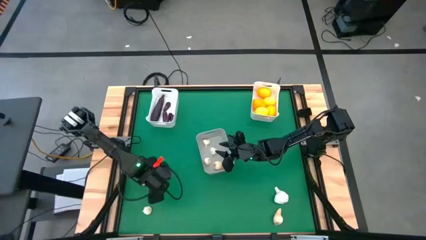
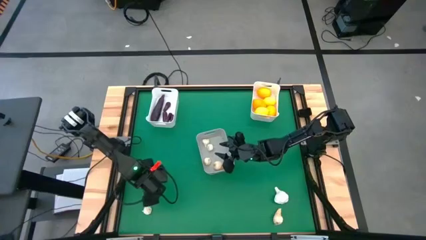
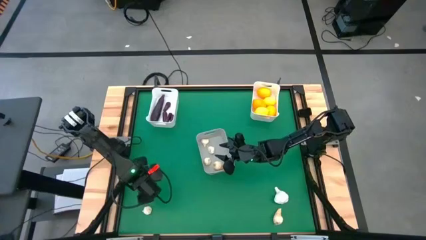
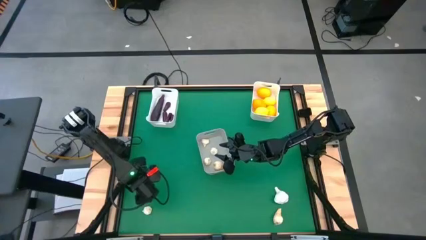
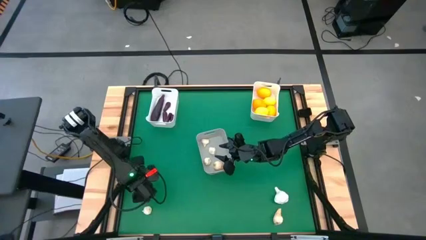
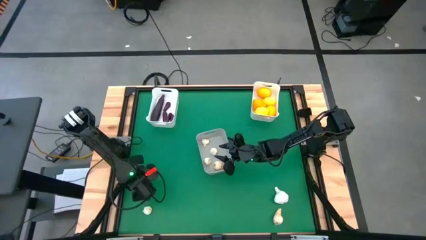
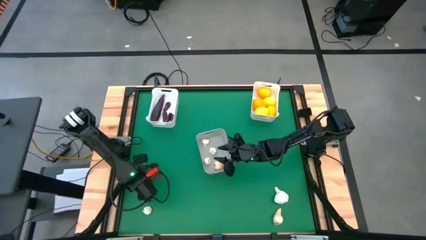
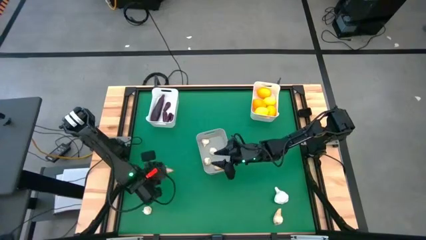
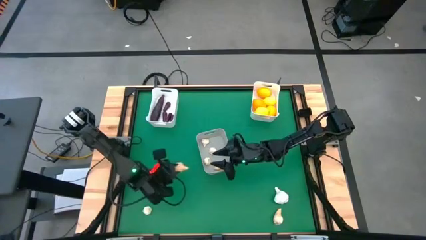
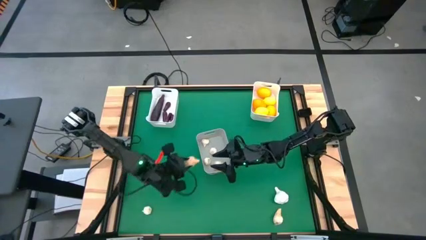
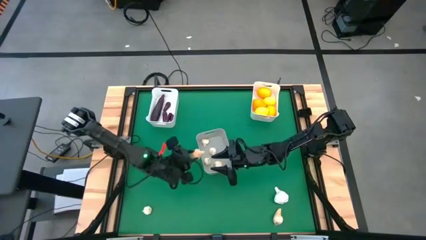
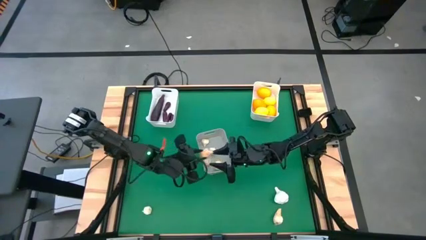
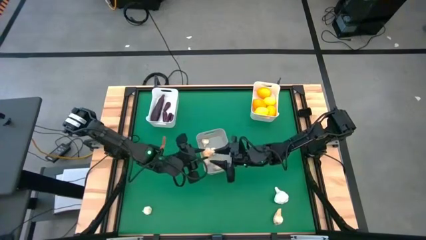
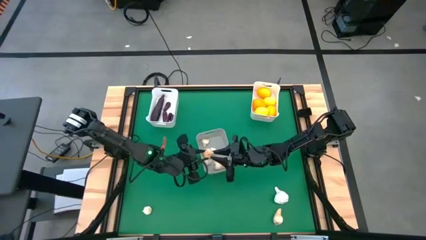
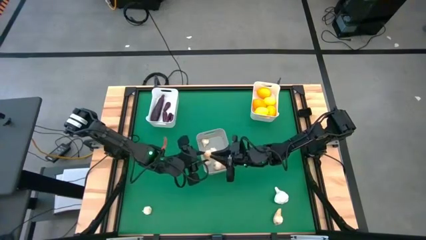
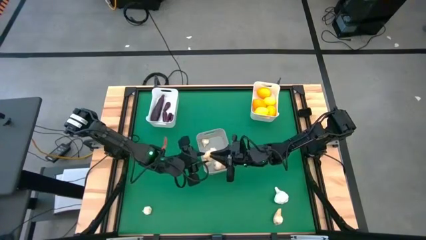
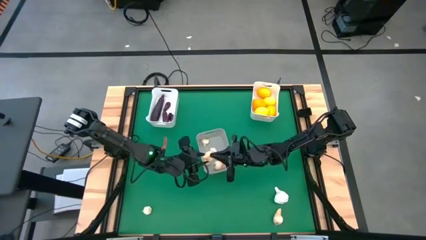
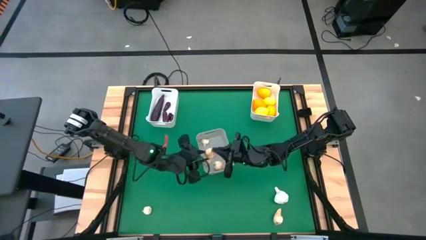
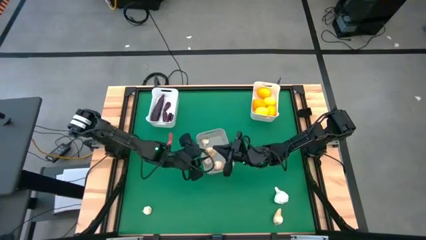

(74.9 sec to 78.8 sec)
Task: Sort produce into baskets
Put the garlic into the gray bin

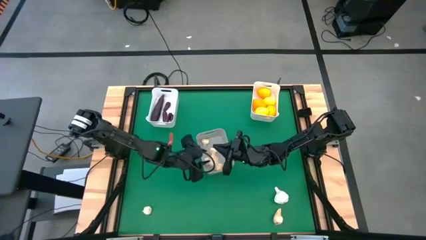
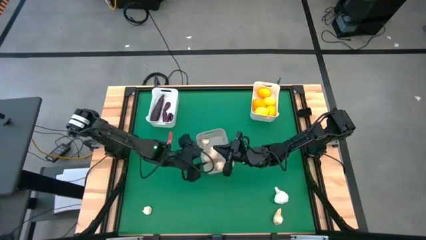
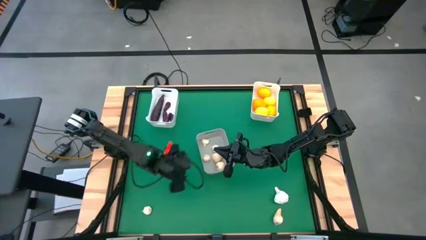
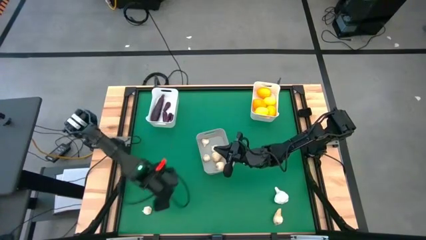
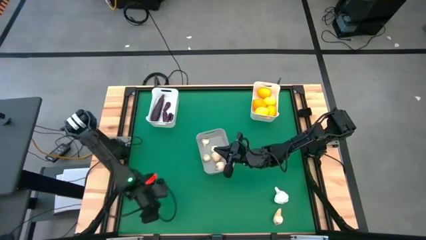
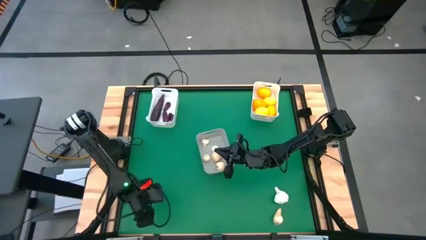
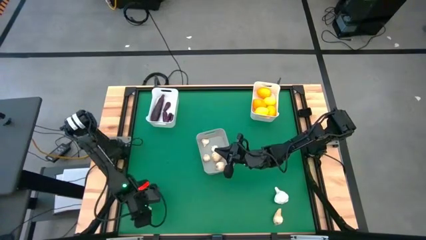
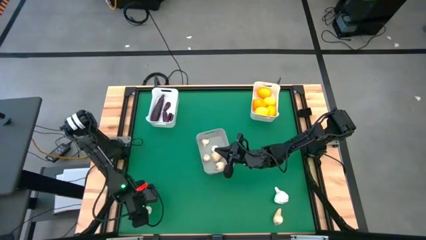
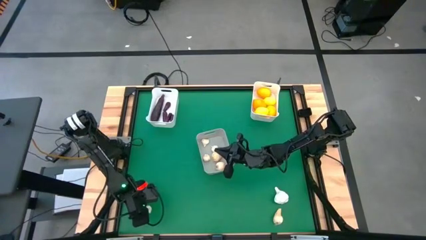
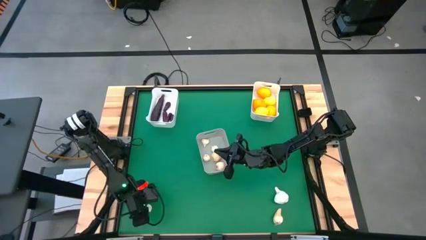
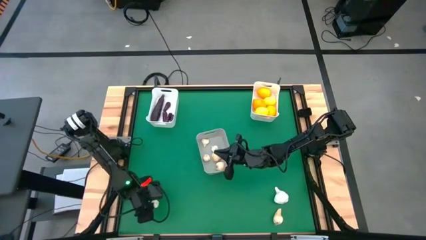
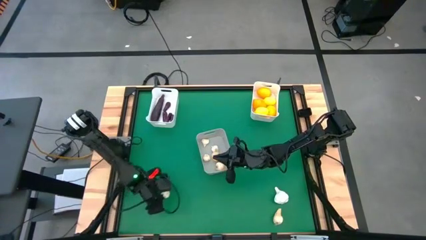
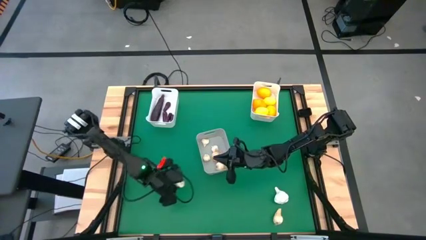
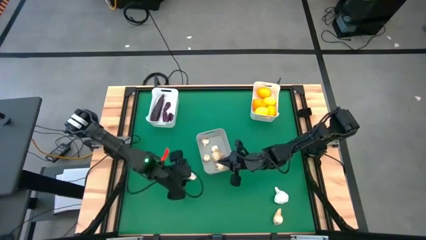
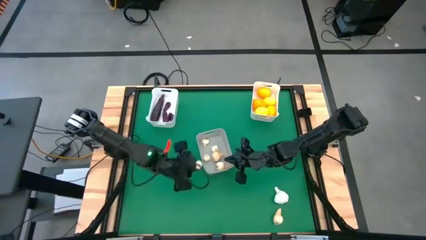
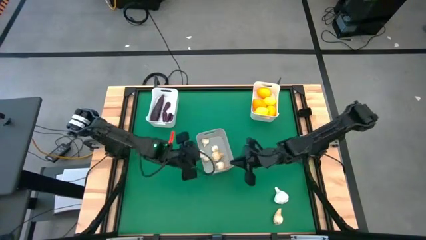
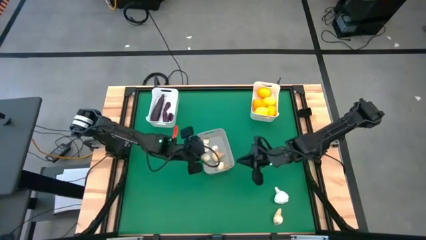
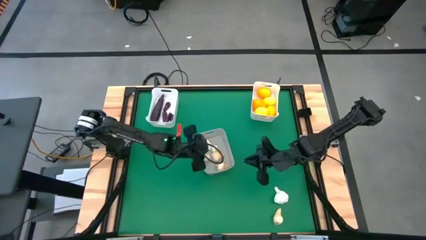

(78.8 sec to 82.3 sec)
Put the garlic into the gray bin

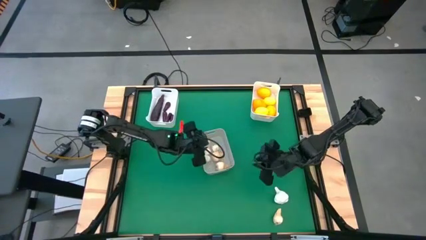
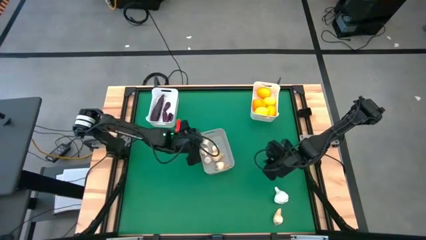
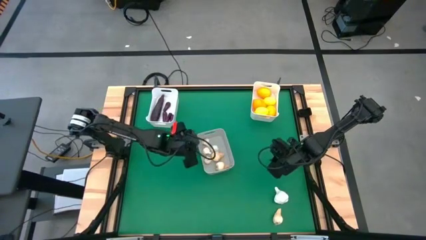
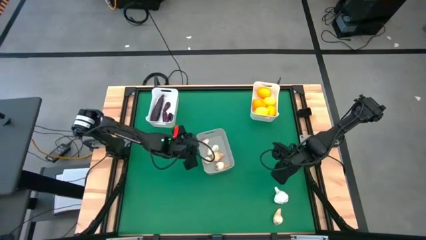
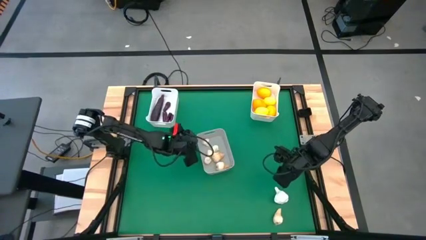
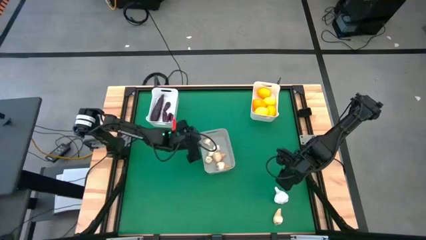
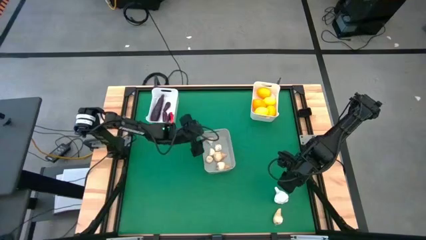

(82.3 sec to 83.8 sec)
Adjust the gray bin

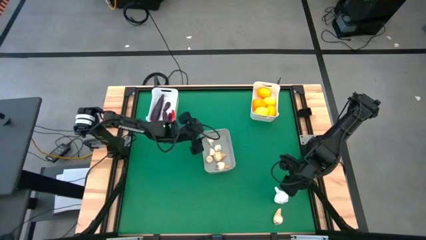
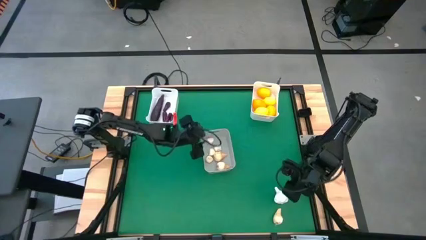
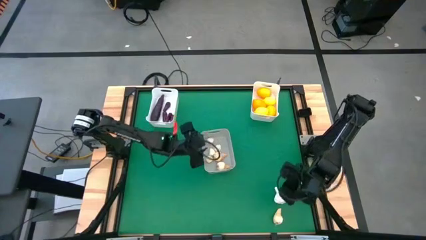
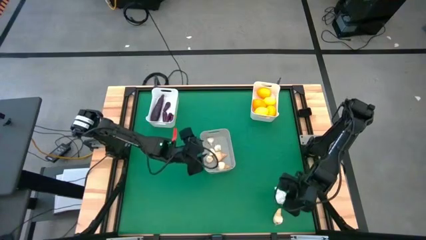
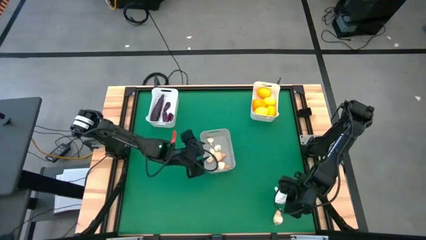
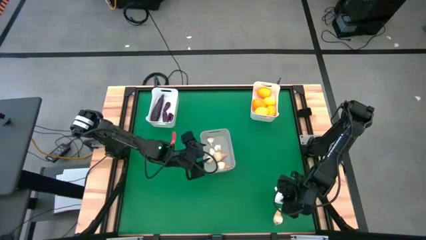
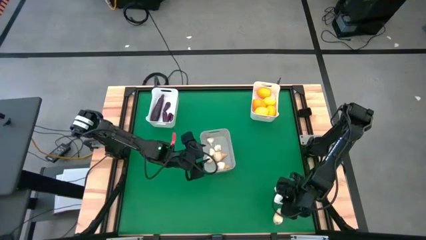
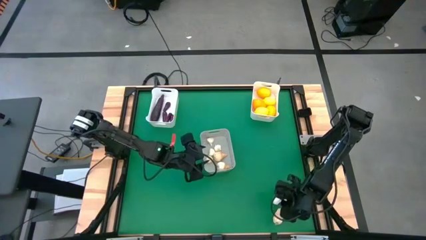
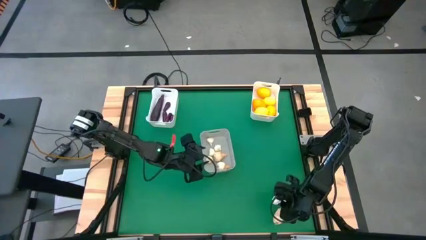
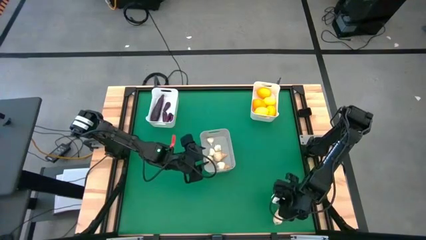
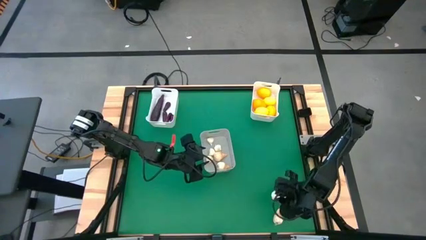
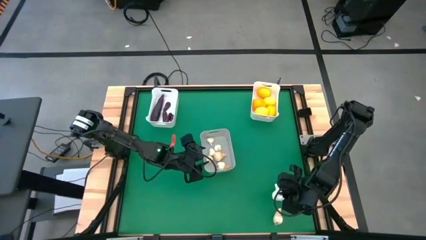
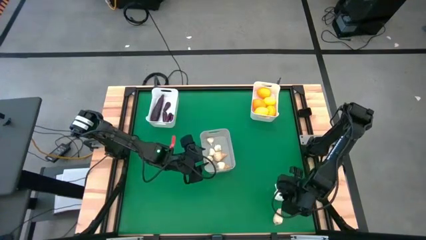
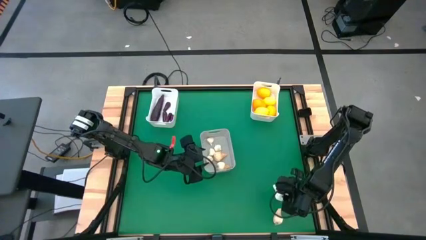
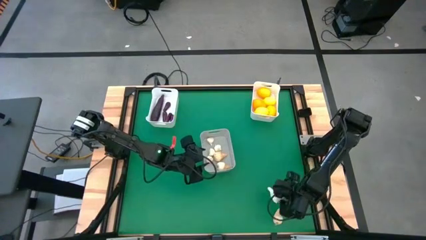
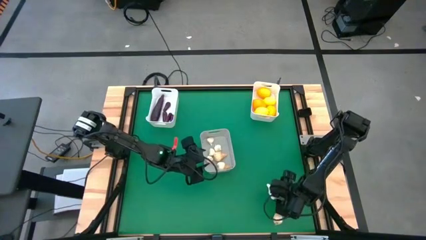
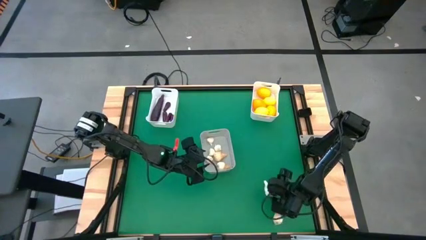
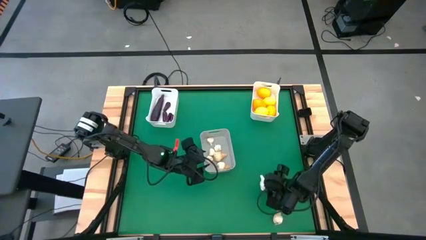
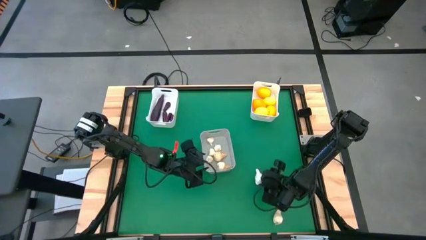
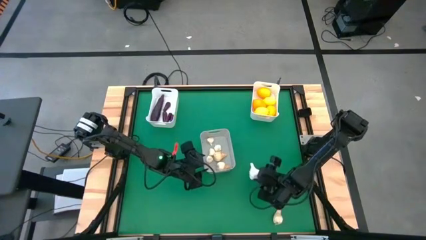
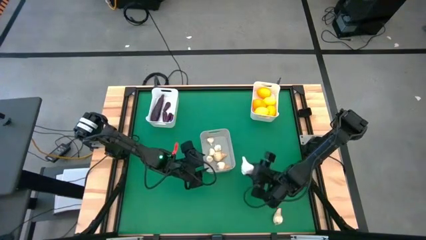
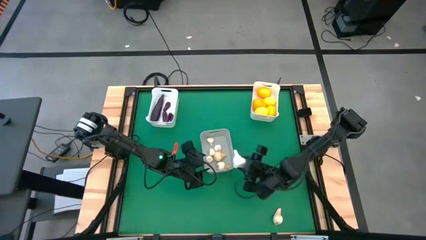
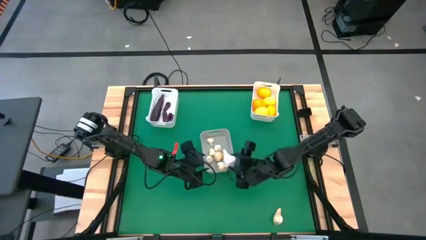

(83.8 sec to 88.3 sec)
Put the garlic into the gray bin

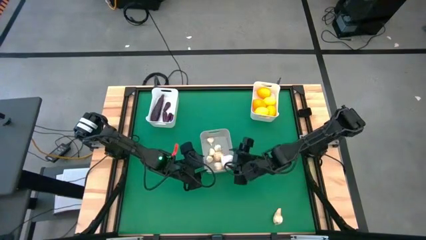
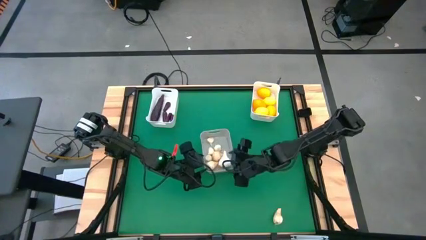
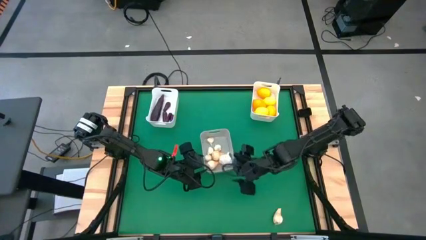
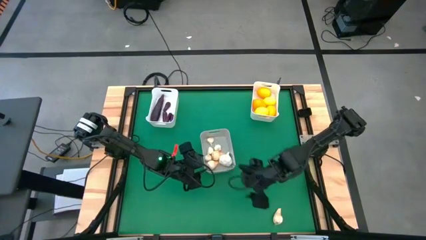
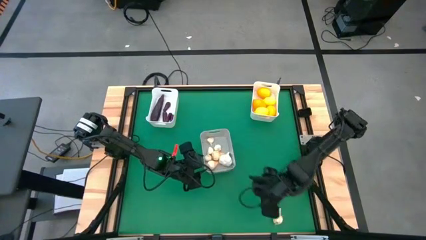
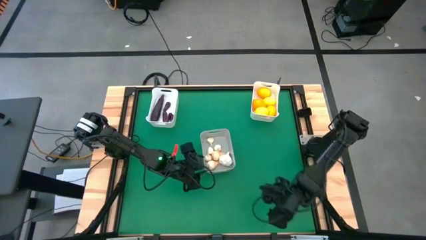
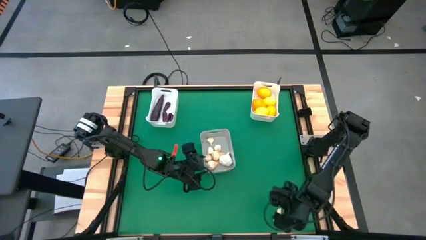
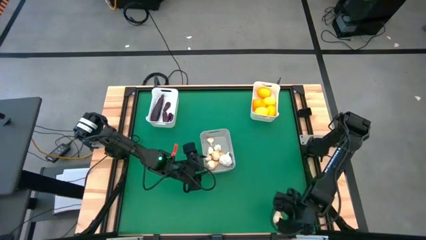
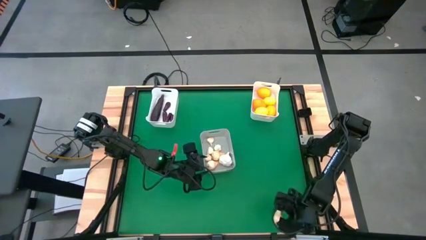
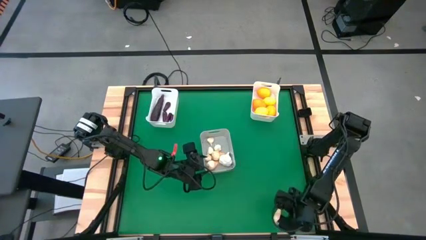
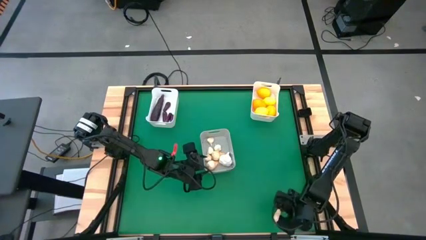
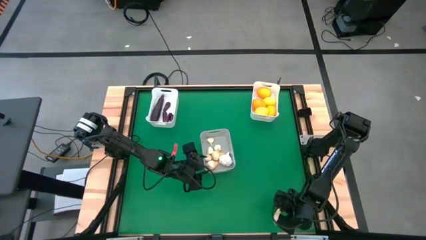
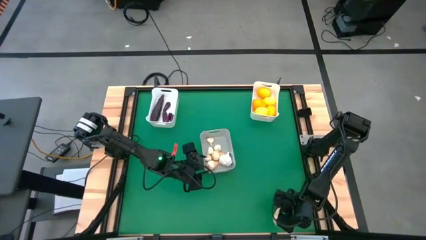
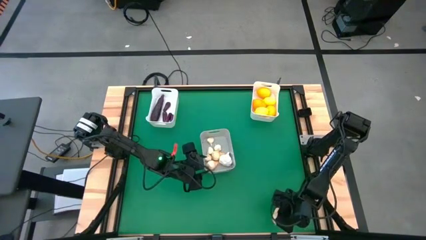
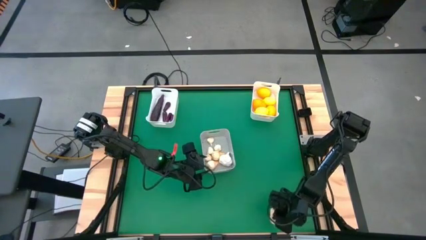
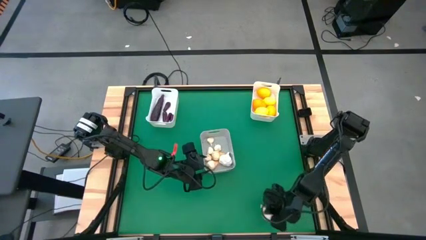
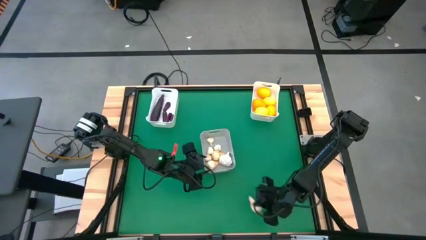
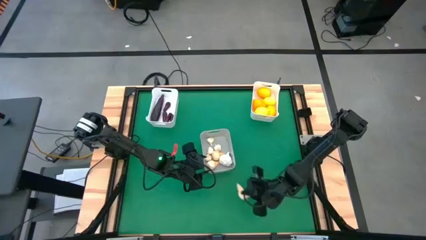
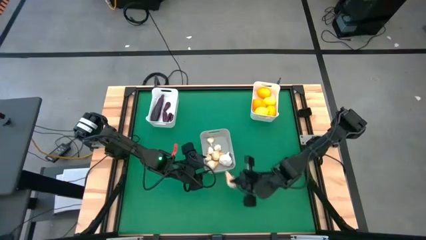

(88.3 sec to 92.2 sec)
Put the garlic into the gray bin

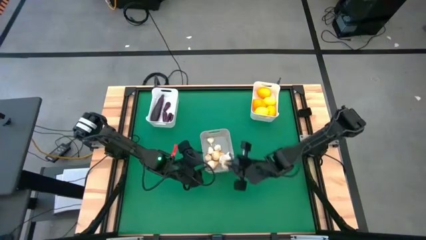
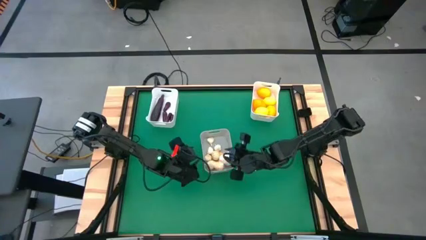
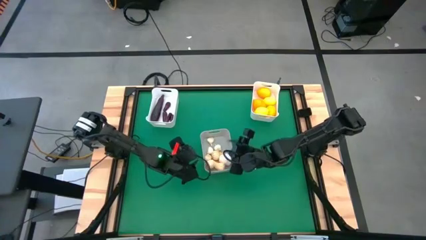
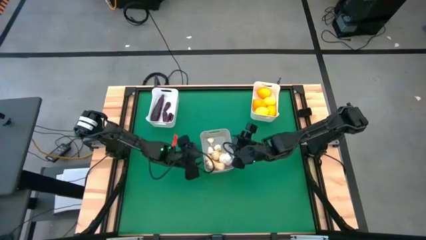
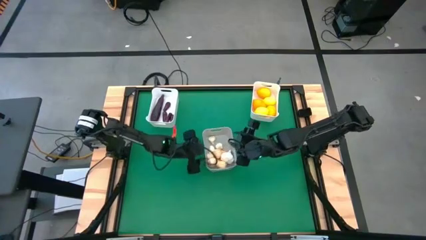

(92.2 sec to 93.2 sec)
Adjust the gray bin
